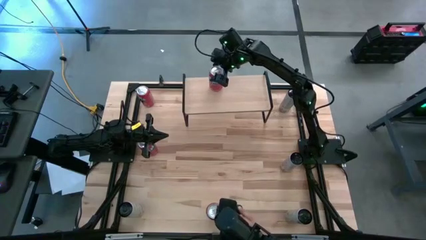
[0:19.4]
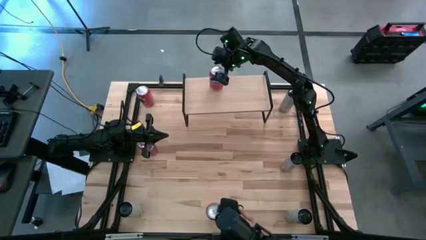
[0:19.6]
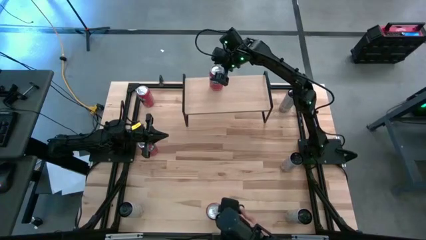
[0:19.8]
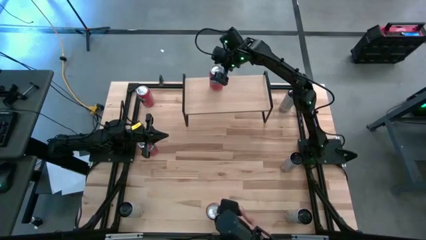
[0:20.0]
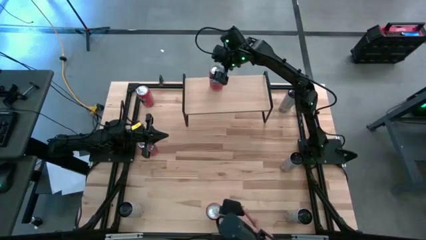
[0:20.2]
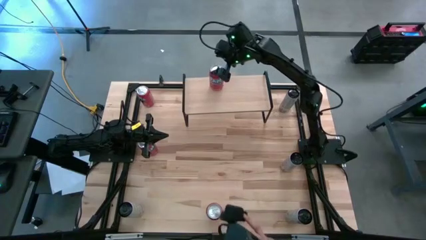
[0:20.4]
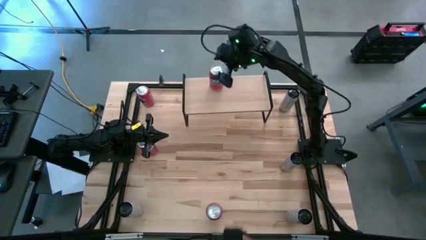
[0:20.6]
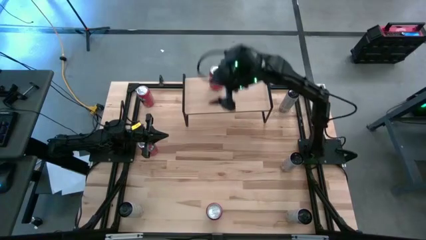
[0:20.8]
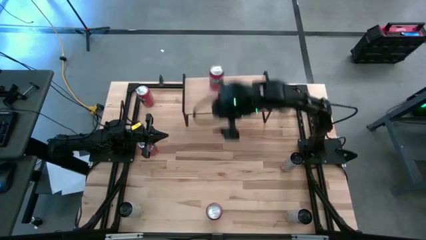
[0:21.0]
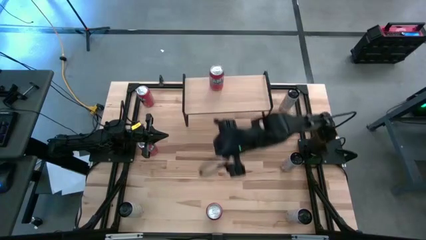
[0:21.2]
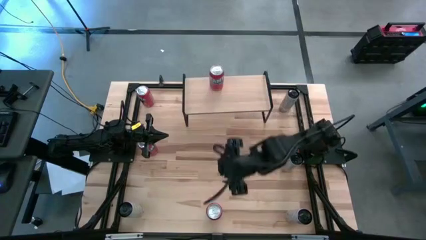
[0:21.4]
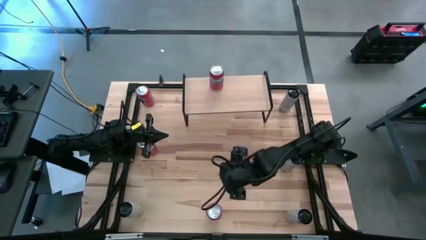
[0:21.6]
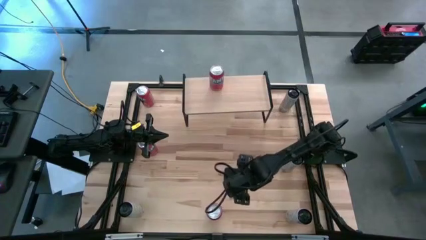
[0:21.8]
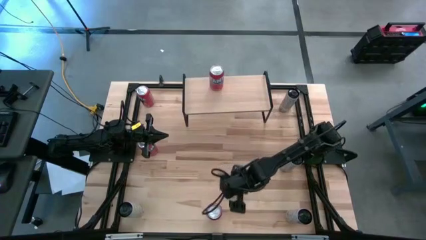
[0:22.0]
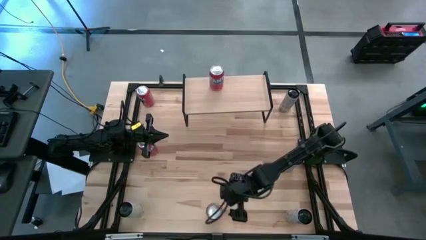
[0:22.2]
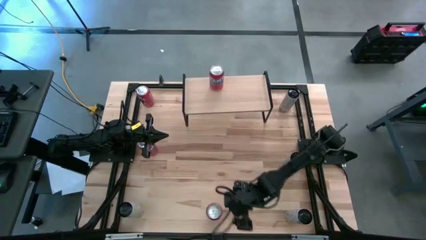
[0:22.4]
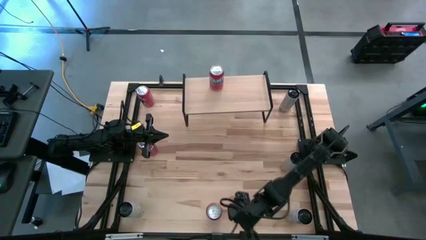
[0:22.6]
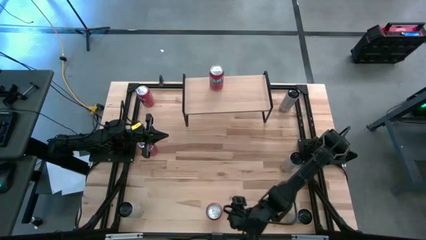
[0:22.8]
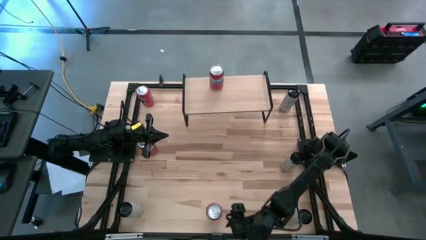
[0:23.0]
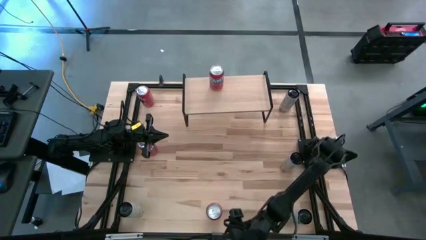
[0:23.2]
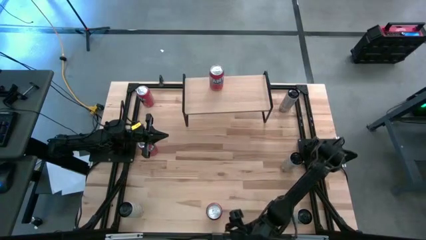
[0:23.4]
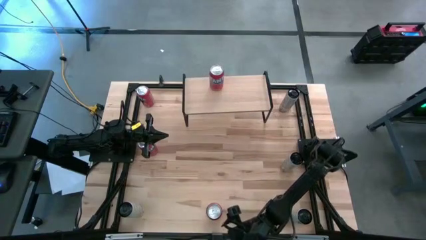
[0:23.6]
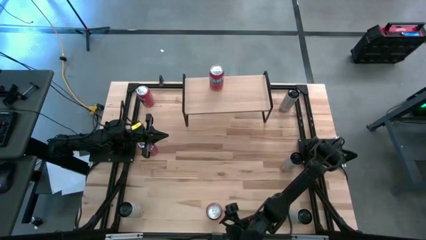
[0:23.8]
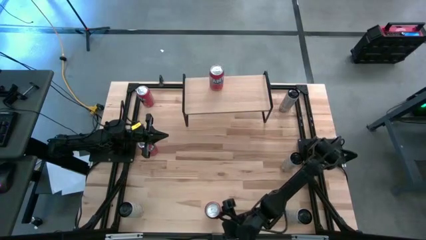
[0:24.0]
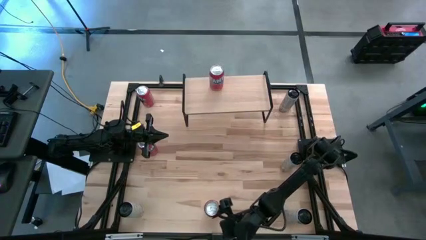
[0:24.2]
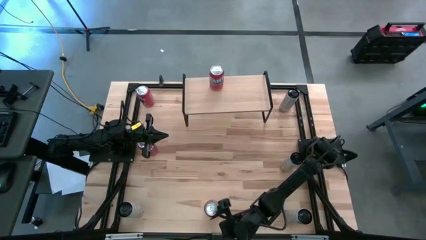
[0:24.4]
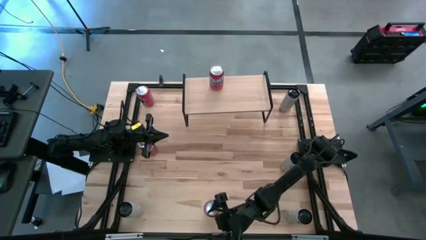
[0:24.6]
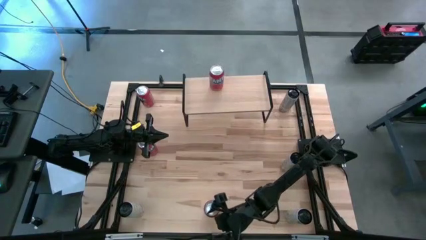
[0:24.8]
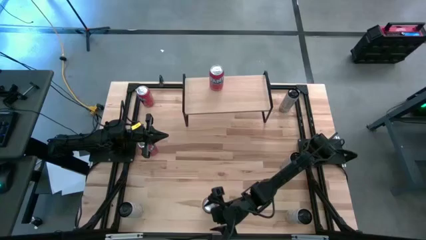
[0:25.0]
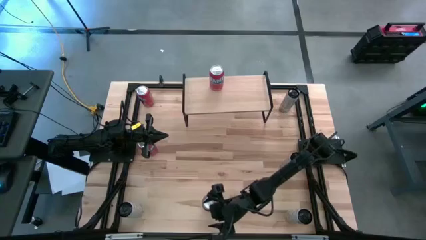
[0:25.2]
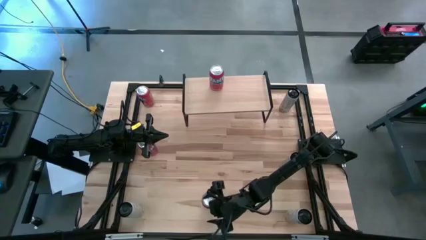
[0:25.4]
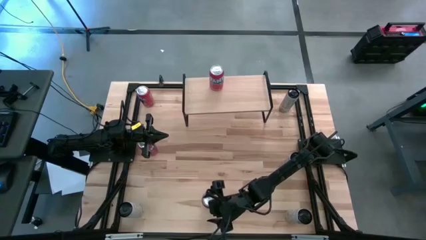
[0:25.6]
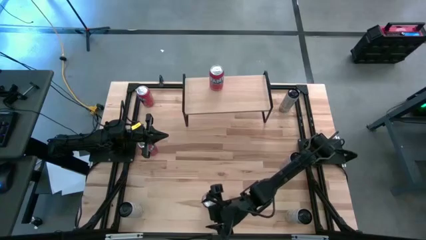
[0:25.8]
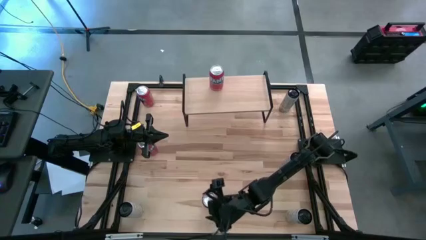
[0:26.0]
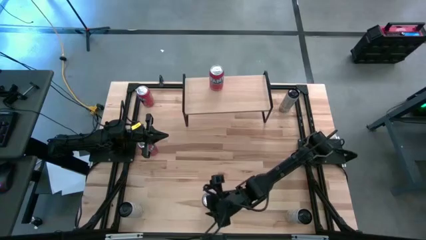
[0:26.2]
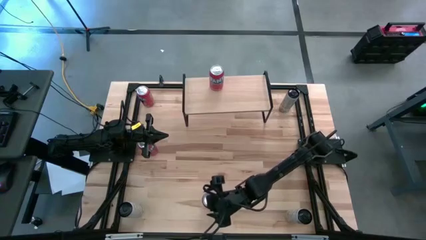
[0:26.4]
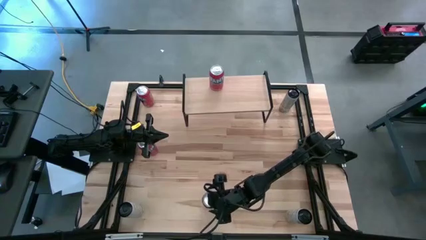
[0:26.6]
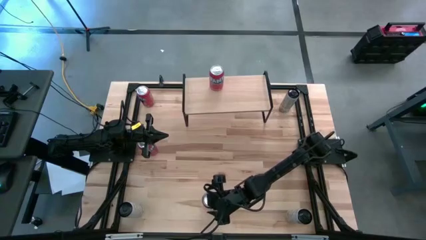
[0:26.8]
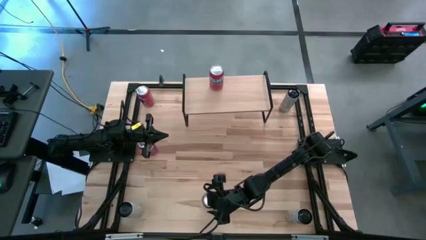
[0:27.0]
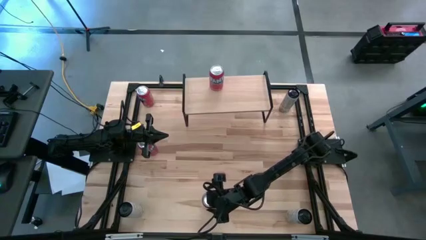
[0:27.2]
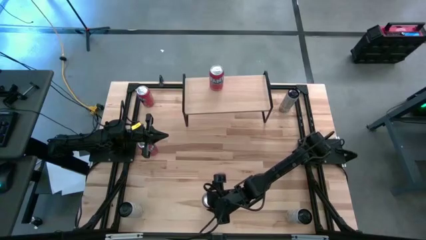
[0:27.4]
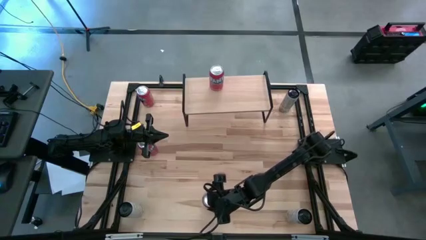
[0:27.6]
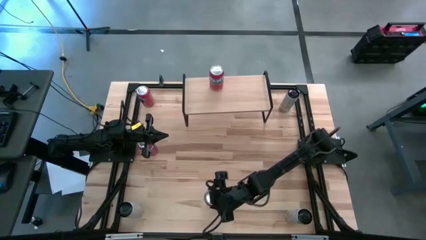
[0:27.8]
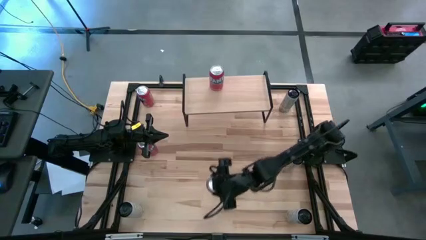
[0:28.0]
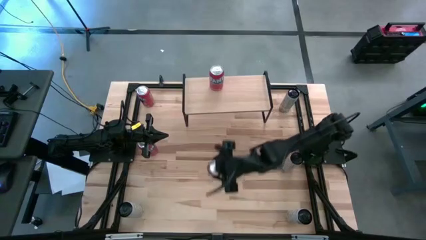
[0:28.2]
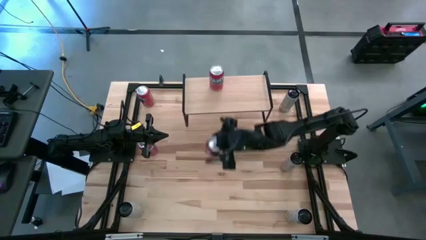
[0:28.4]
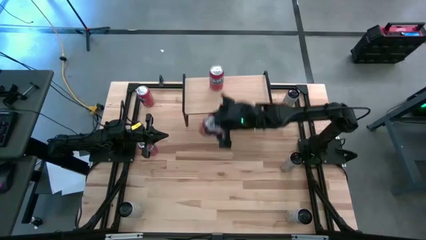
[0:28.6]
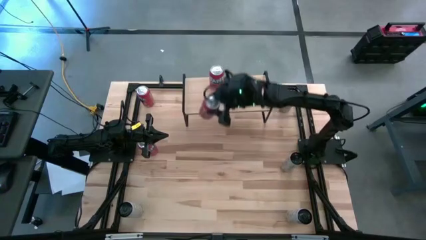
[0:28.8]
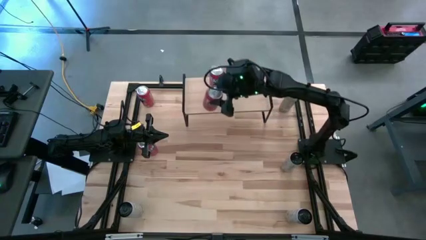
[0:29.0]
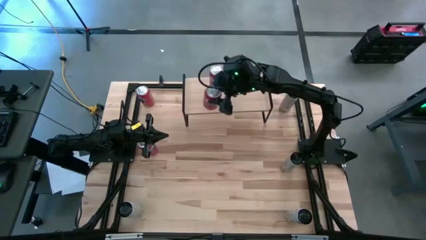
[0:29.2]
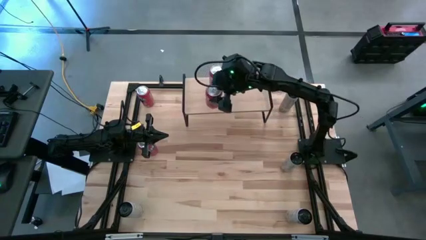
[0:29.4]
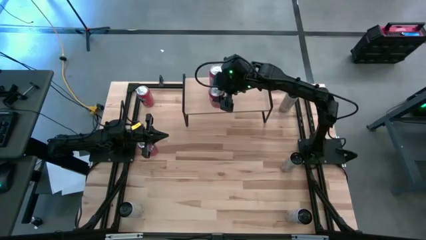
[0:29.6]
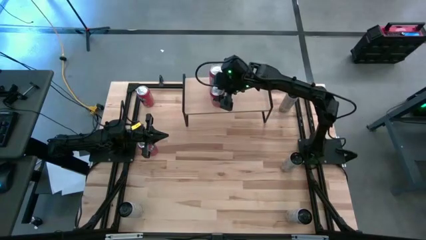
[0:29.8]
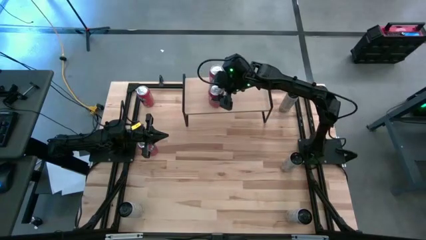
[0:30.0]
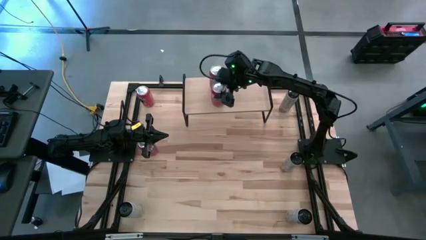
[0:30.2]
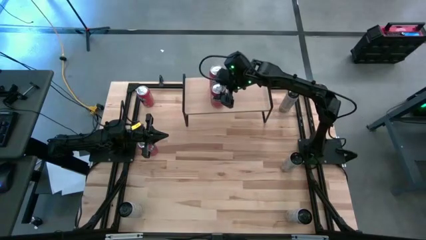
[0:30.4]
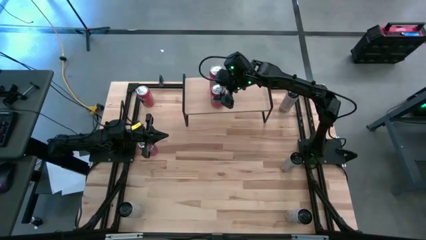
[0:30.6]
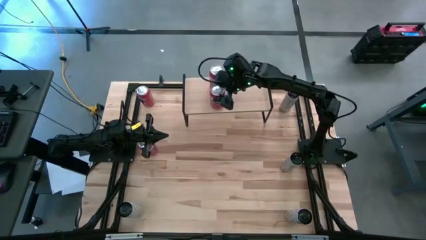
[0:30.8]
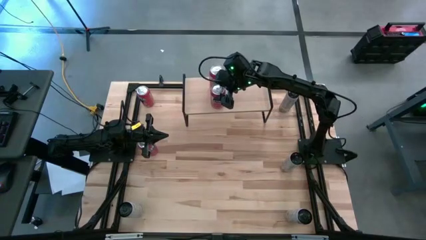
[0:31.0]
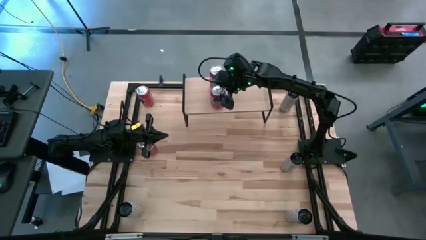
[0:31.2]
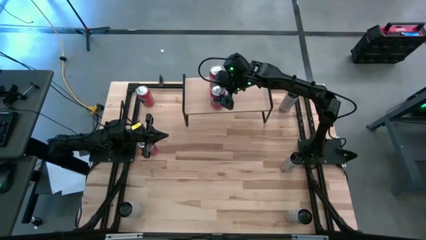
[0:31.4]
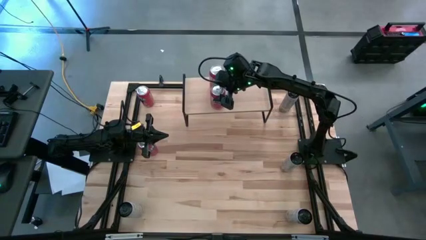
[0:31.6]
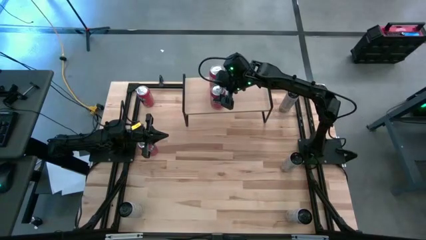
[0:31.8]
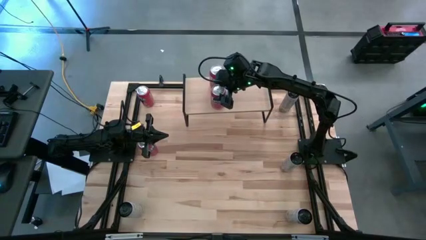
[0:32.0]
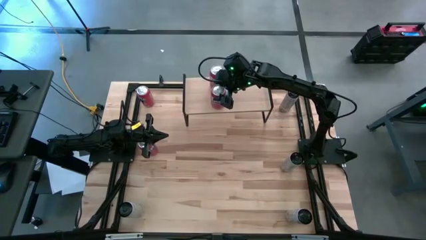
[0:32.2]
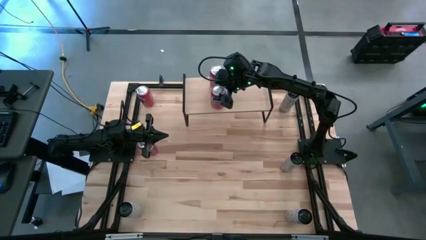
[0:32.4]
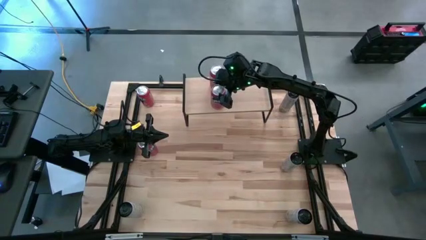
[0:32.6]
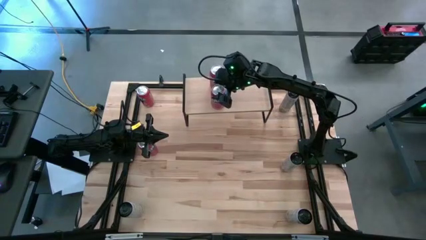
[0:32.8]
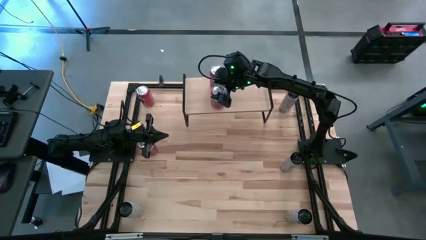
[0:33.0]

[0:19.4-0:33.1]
Task: Place canned beverage on shelf
Put the red soda can on the shelf aligned with the other red soda can
